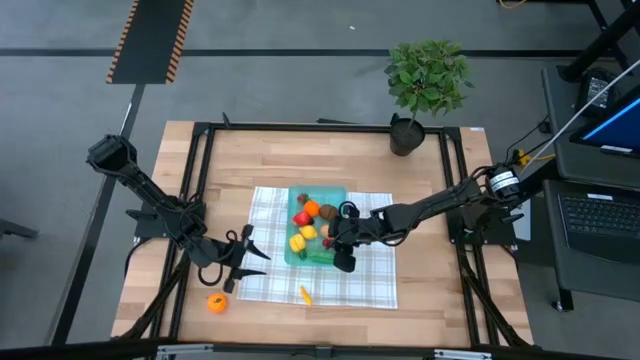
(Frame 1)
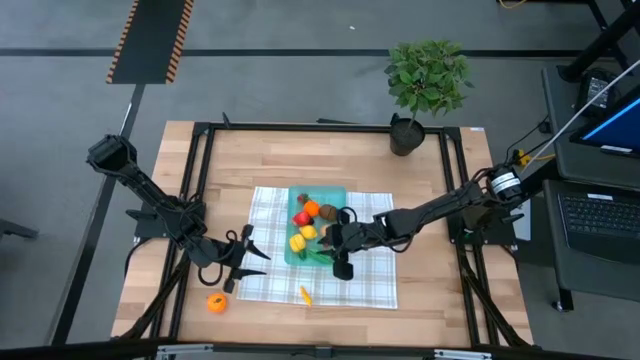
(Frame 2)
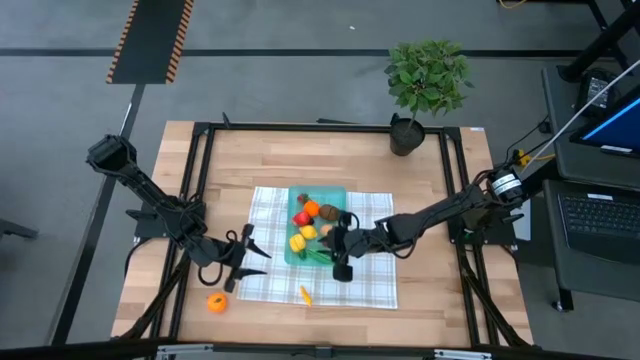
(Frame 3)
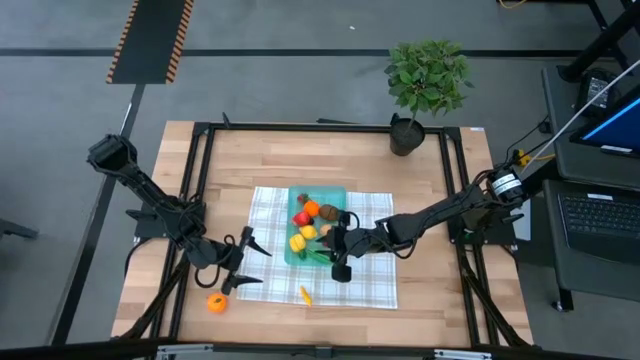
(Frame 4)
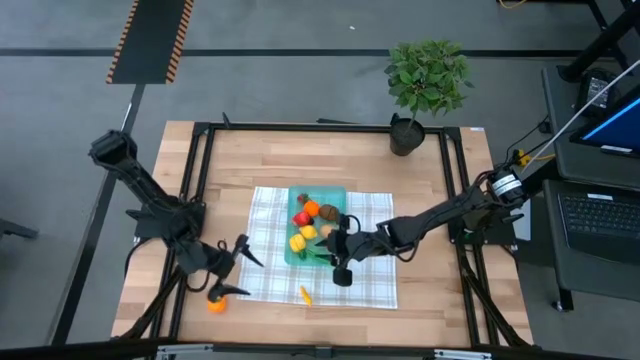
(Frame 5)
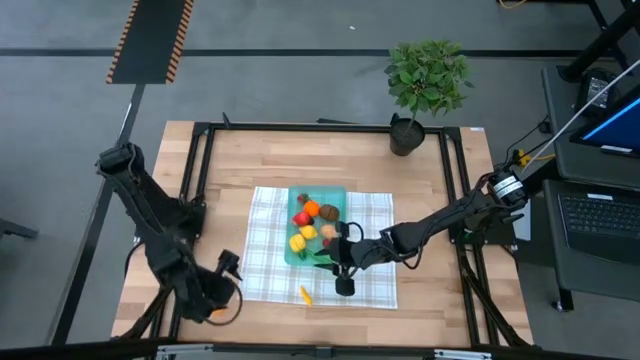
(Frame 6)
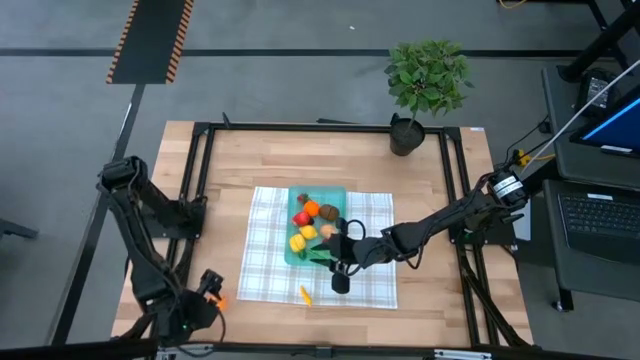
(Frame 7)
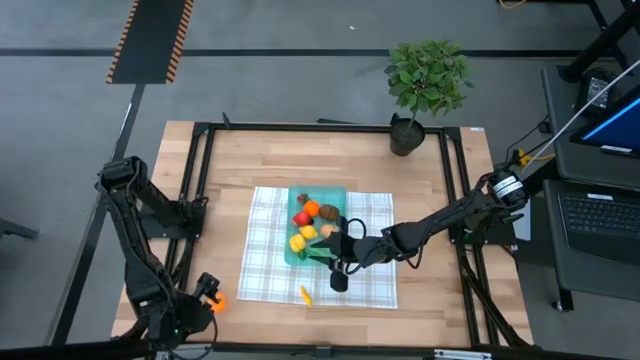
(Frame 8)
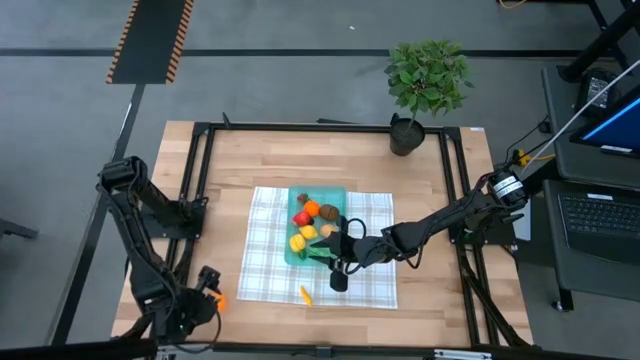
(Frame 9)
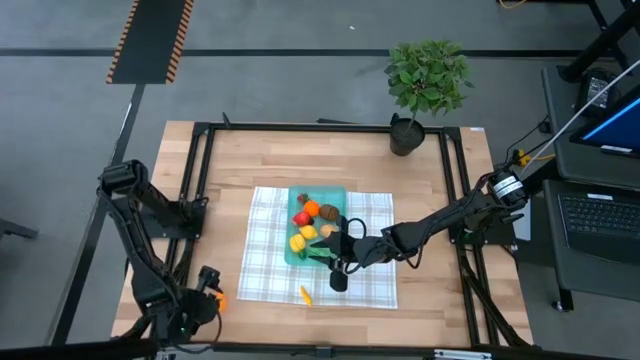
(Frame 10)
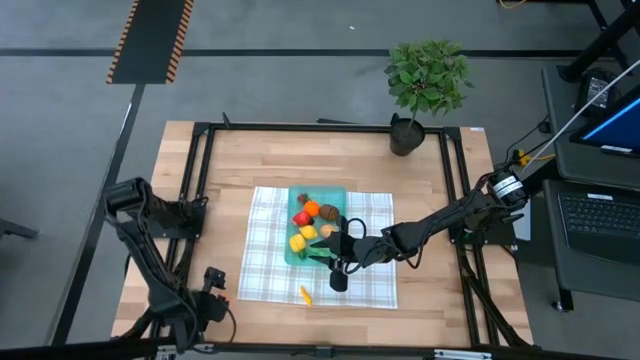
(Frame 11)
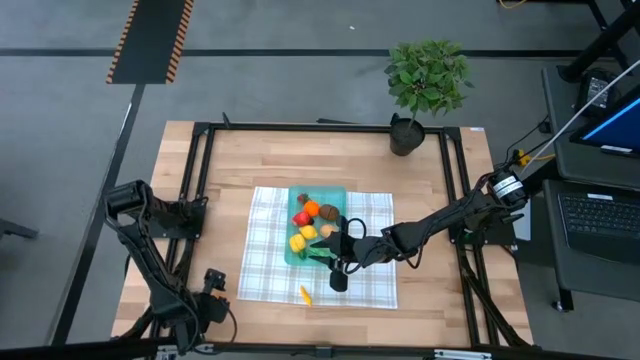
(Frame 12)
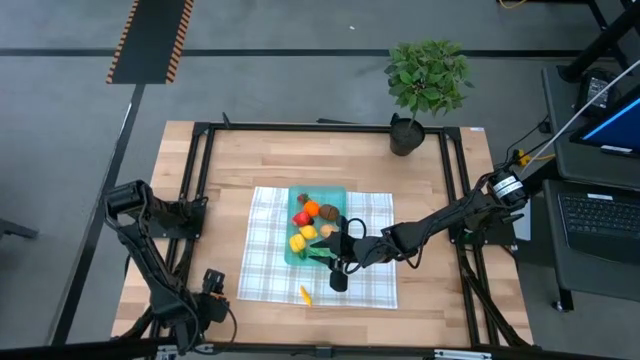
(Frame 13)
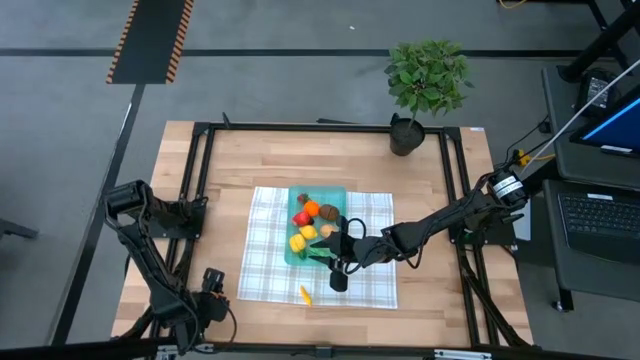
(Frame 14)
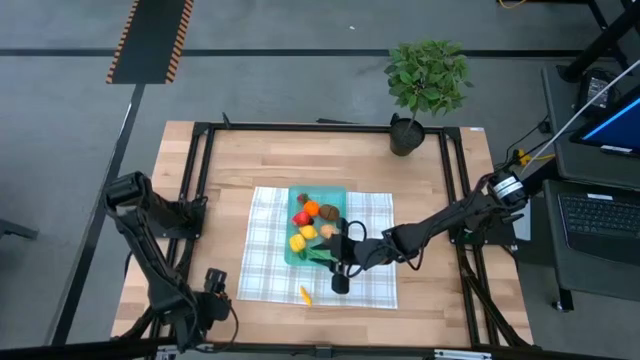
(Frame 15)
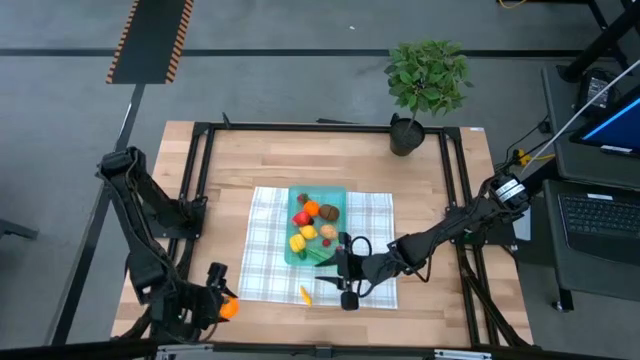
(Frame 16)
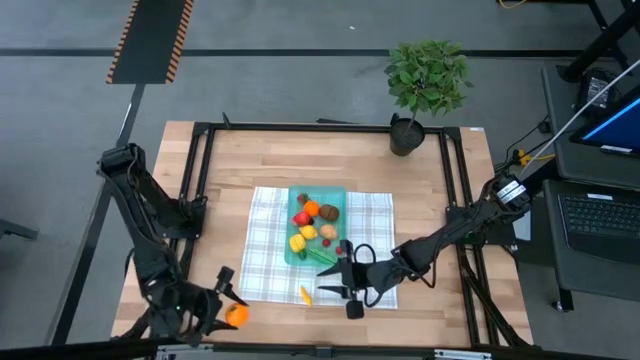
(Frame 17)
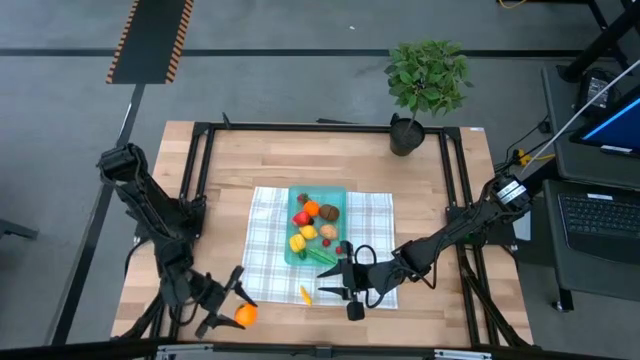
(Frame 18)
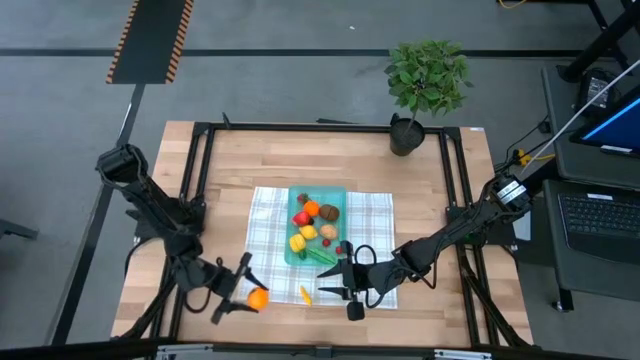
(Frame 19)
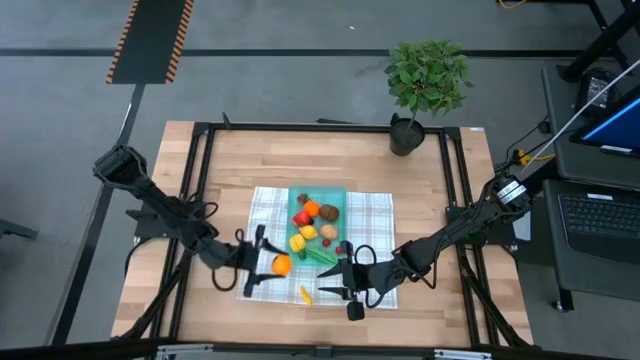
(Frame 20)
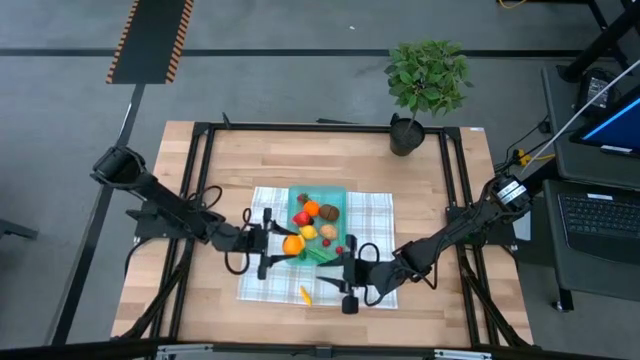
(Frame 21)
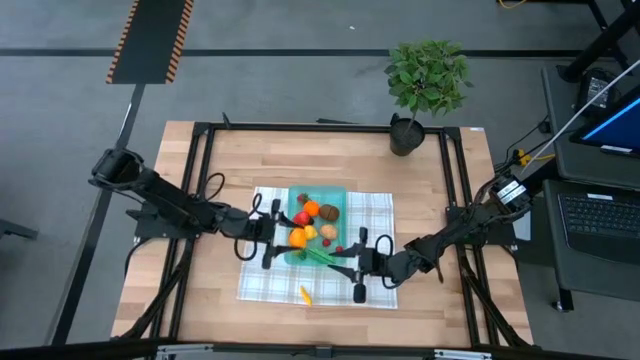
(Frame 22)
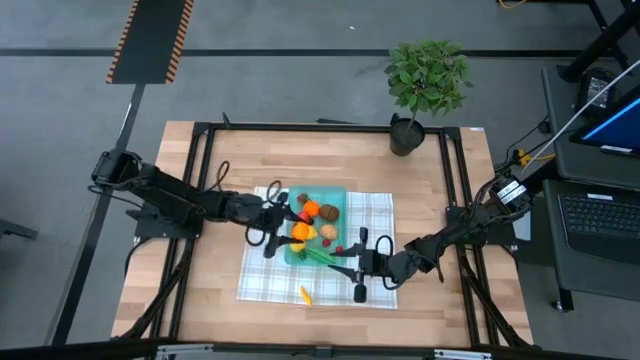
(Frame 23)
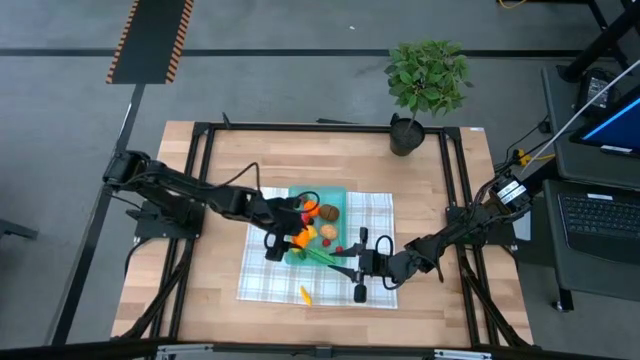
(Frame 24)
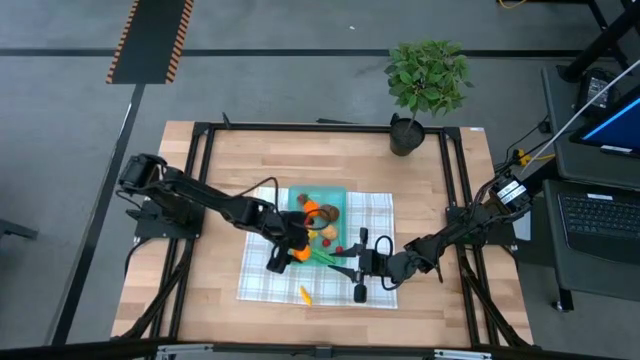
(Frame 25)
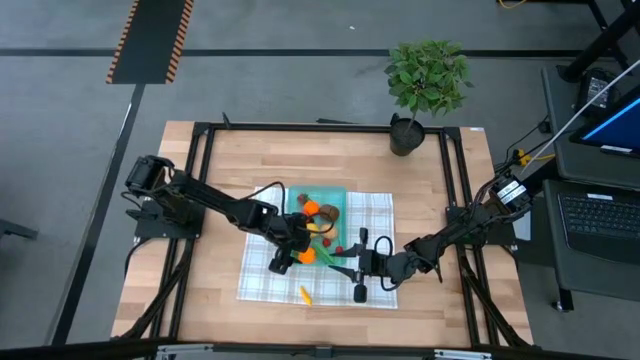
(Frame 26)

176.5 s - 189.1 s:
Task: Pick and placing Produce into tupperware
Put the orange into the blue bin
